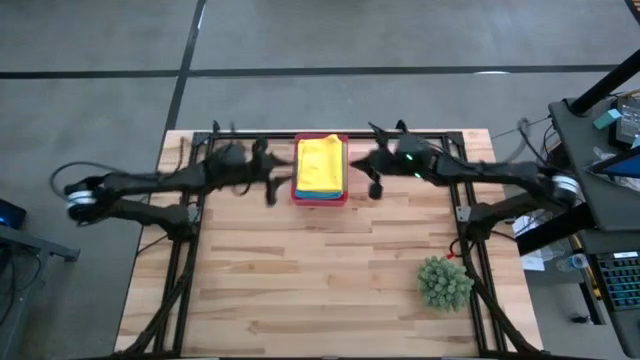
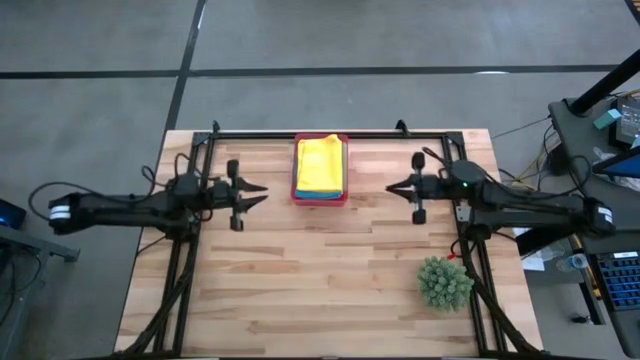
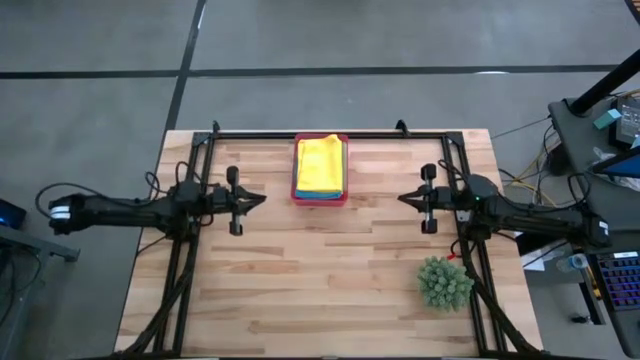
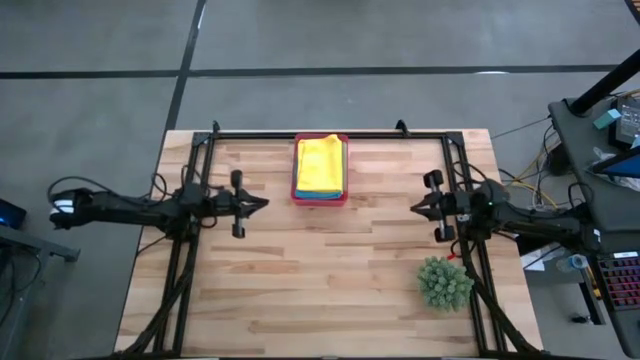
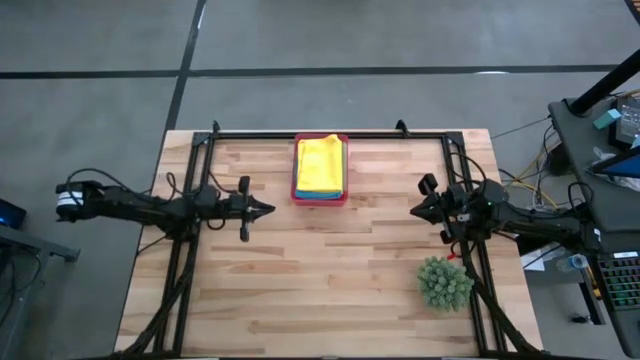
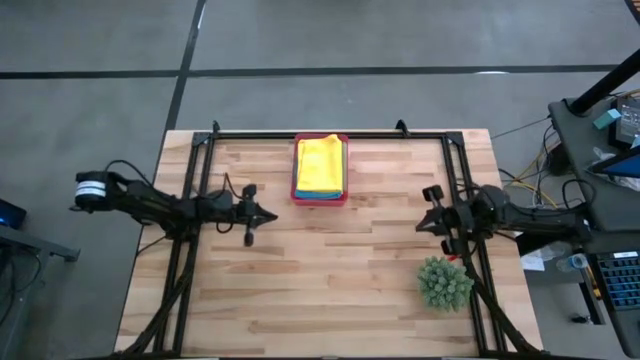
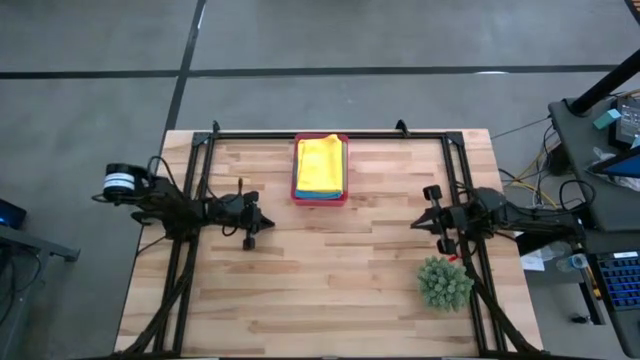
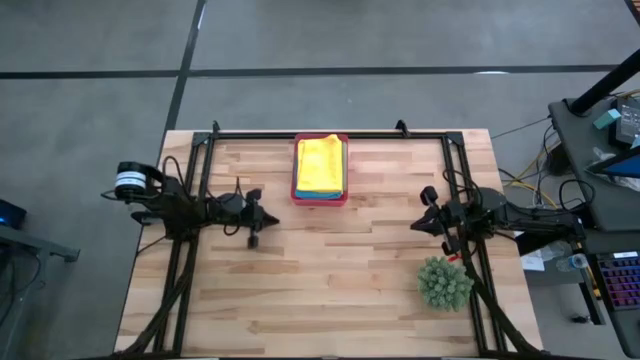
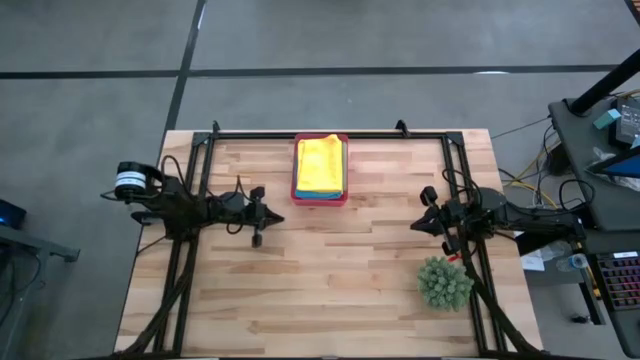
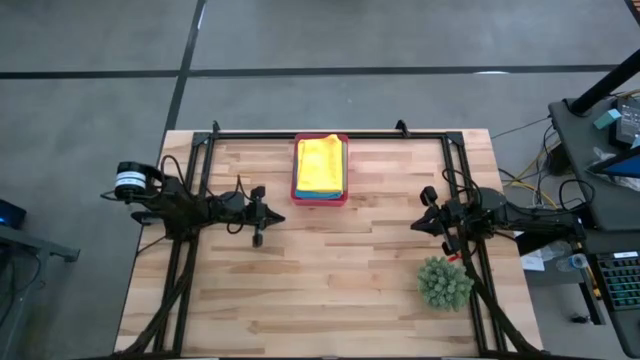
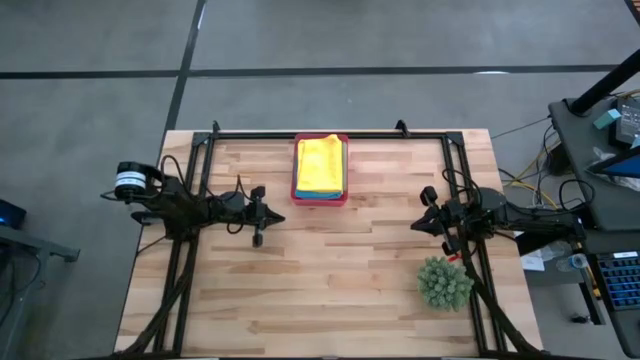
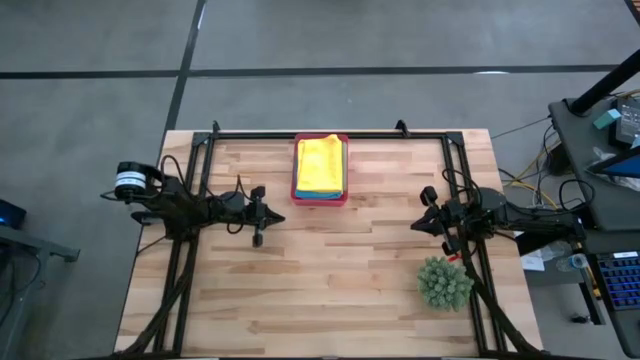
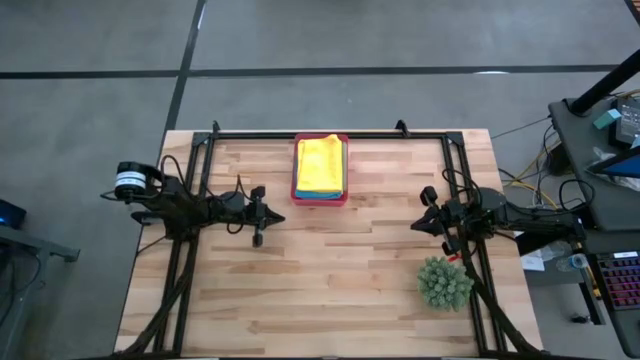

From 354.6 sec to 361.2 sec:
Task: Fold microfiber towels
Return to Home Position
